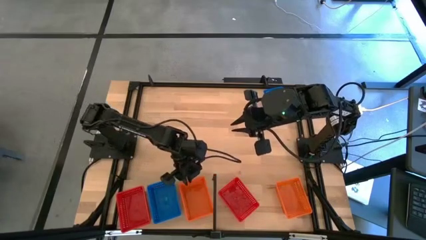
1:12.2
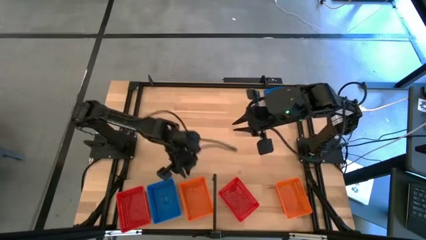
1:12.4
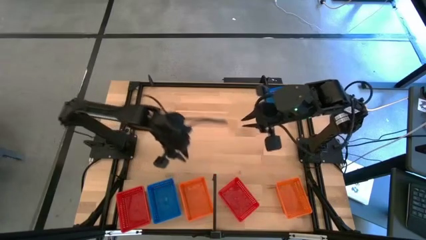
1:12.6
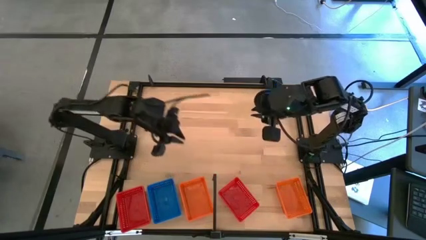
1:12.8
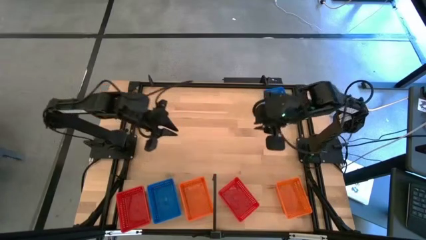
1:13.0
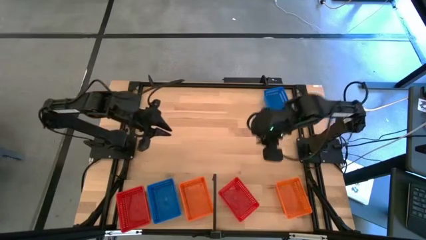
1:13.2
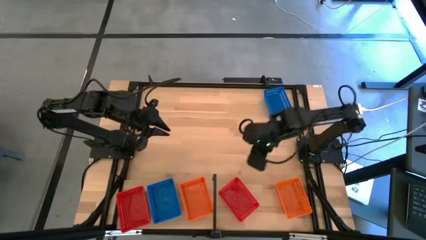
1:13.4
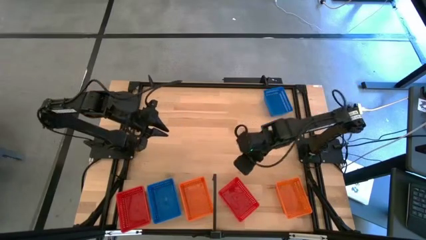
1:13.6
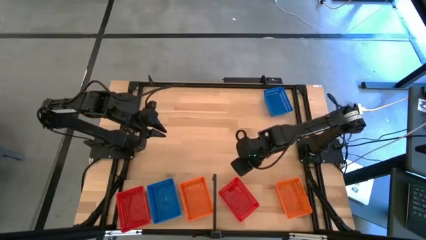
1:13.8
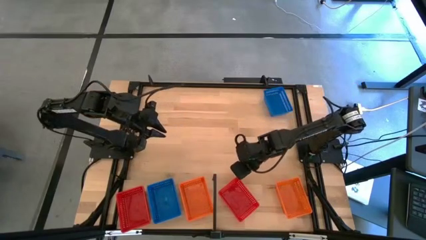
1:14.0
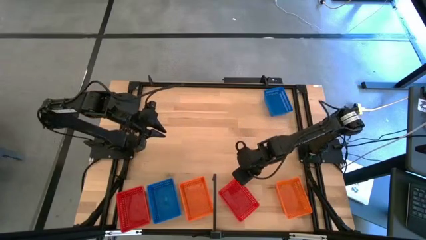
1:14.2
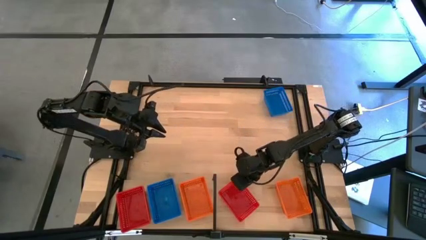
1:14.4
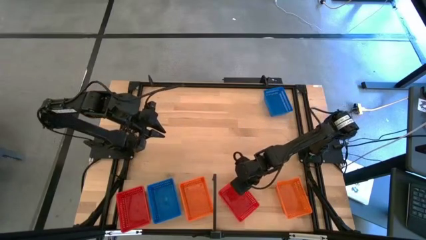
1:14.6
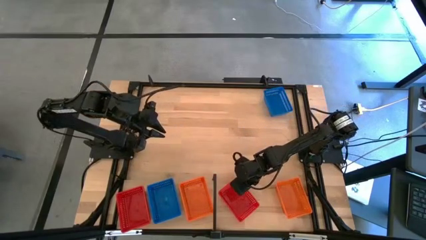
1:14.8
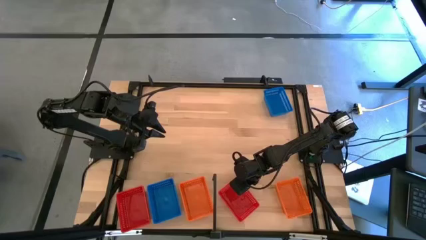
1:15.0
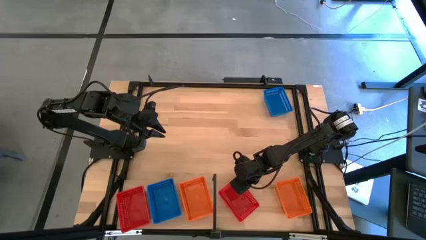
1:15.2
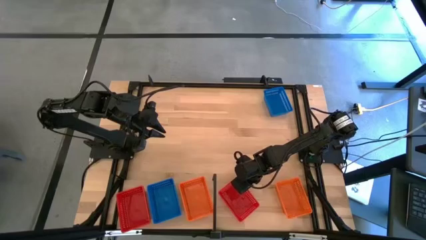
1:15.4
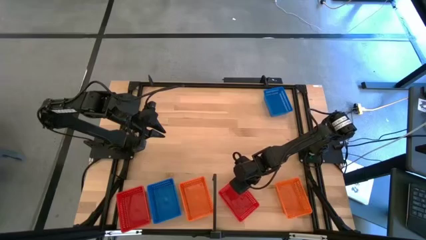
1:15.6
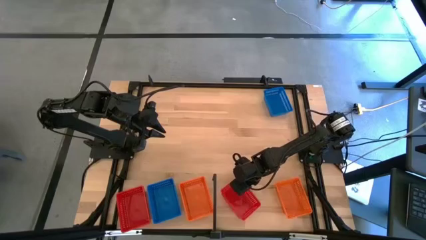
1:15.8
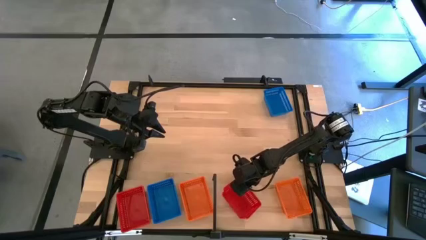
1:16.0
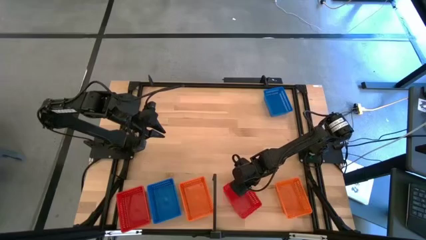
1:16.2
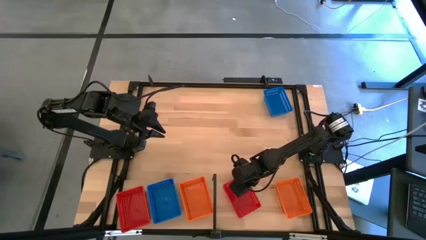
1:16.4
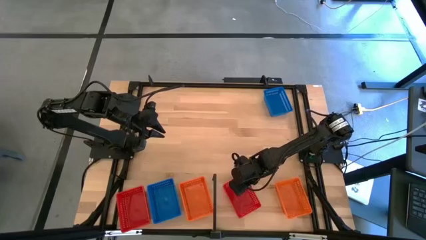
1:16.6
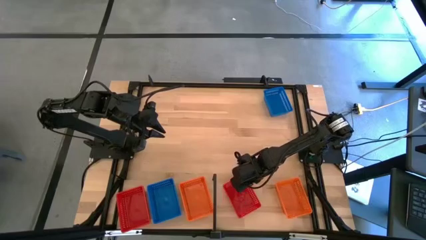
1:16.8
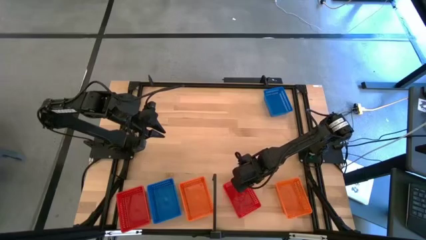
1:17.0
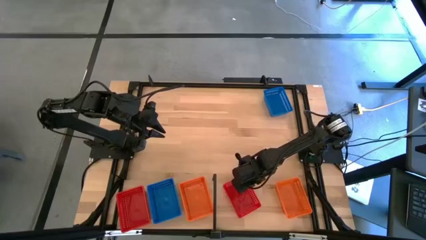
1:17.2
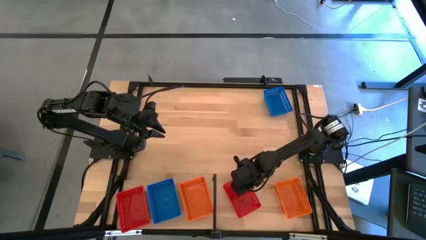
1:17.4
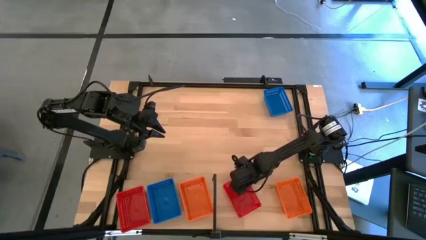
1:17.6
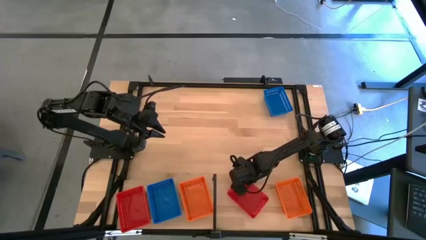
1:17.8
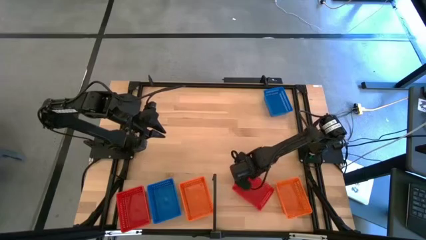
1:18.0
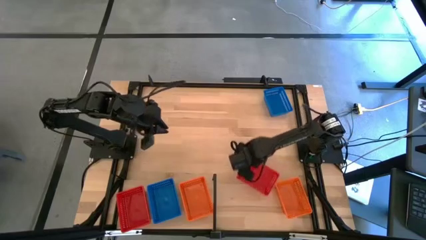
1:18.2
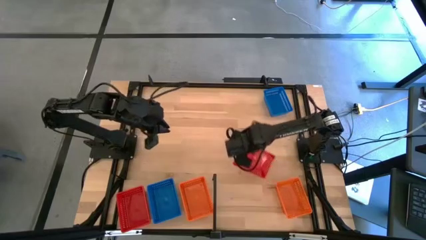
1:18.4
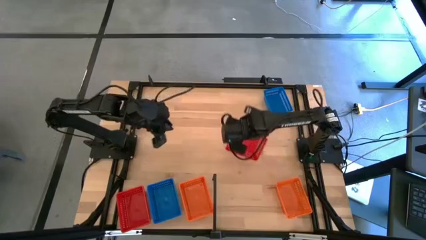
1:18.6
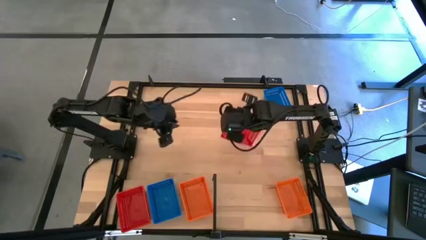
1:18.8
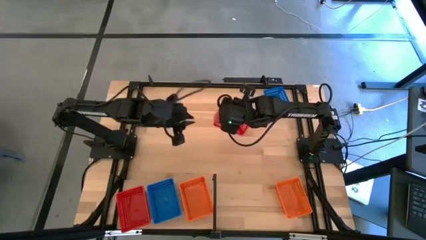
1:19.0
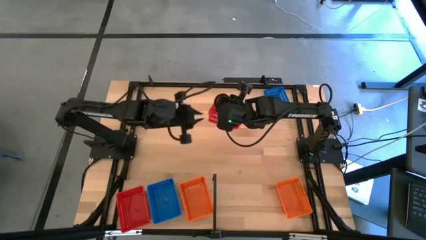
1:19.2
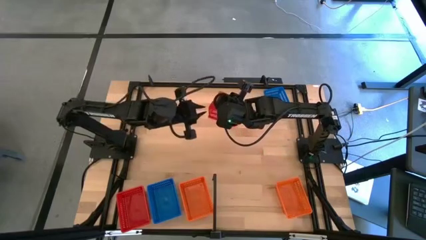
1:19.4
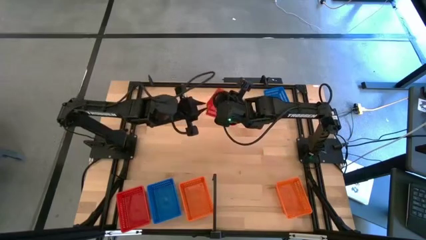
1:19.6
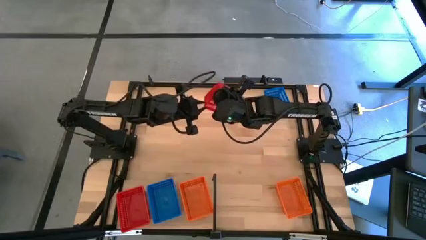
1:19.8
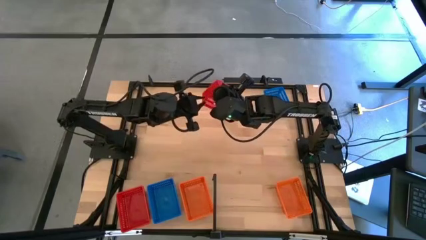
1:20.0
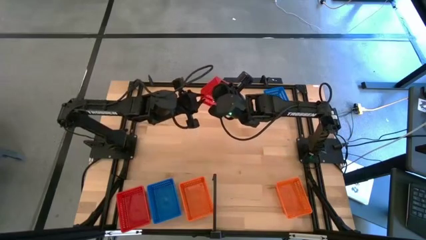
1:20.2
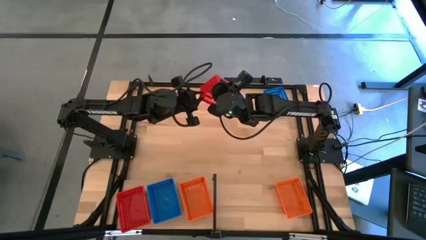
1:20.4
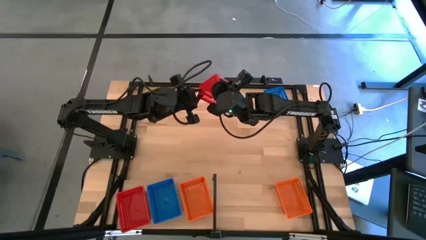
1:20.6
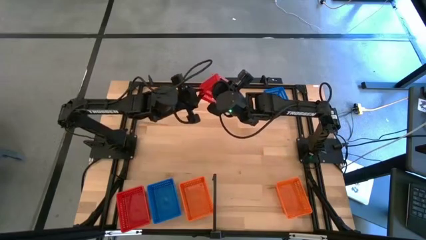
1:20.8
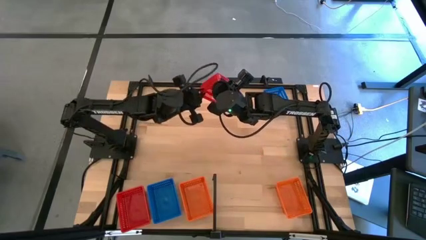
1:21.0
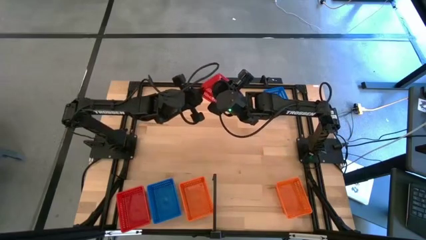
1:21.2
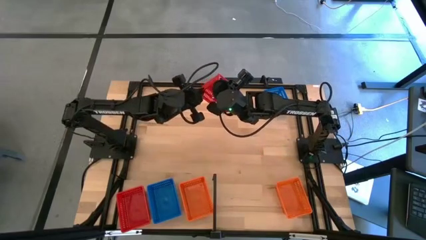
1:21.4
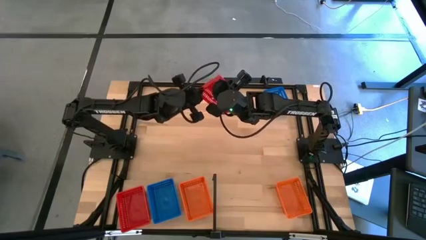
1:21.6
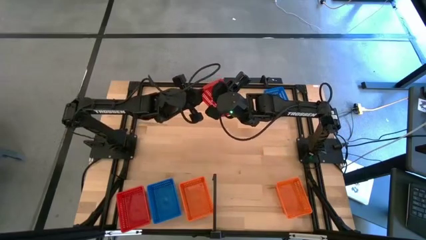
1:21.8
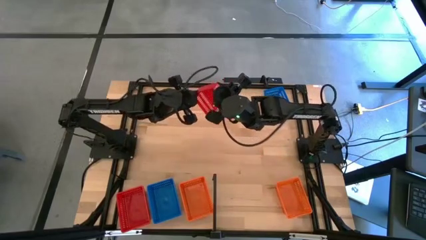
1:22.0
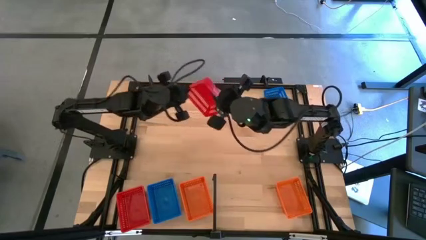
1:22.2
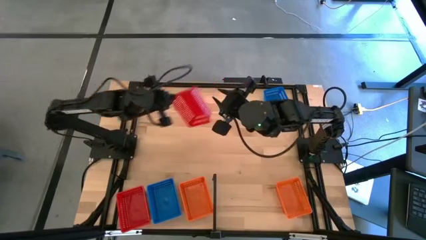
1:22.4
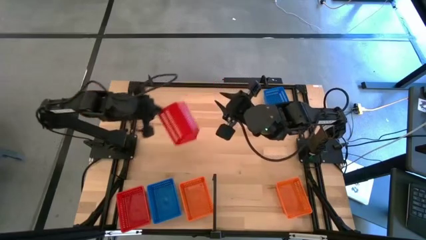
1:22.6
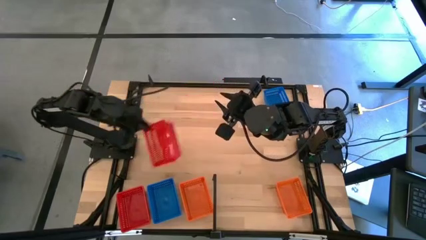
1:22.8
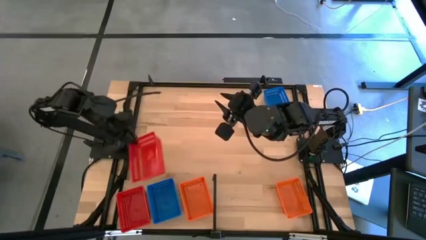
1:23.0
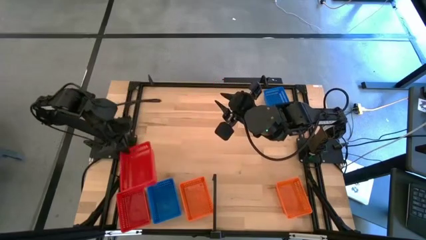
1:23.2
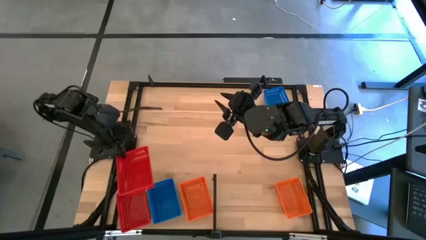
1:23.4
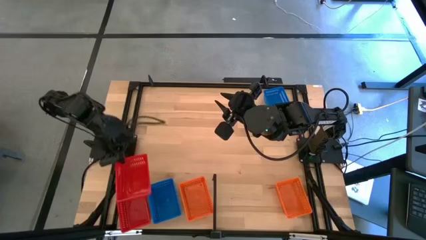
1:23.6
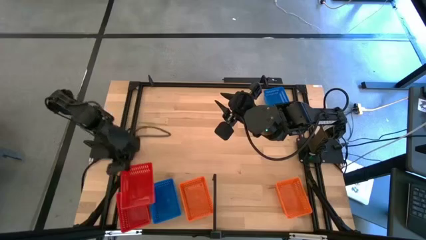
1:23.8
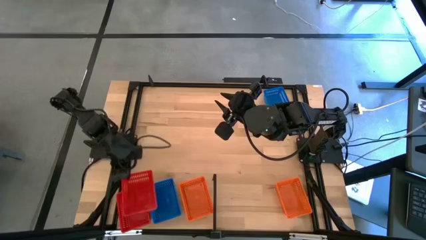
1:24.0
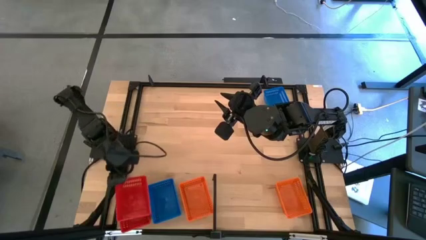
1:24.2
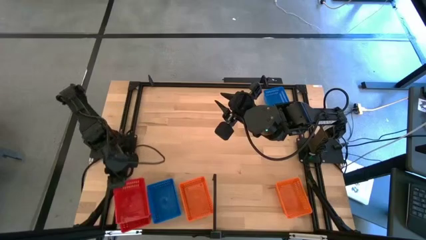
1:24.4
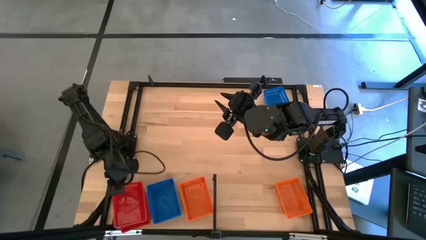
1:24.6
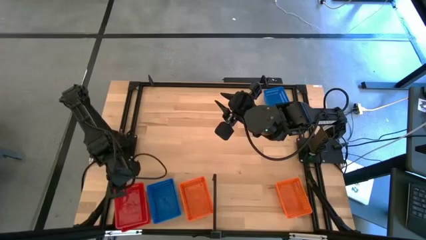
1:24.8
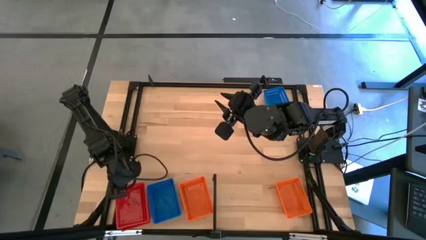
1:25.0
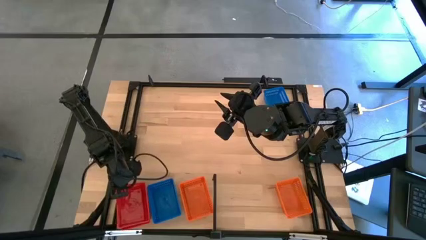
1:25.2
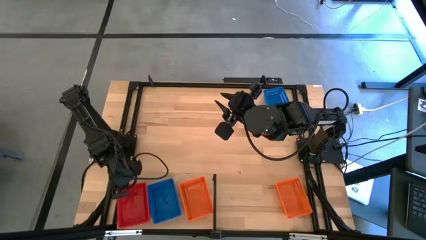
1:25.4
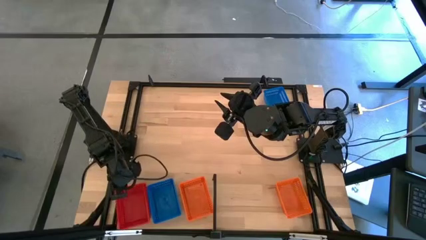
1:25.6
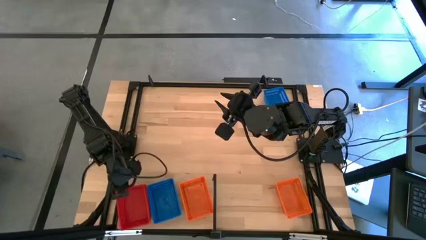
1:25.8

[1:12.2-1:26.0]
Task: Stack baskets on shelf by color
Stack the red bin on top of the red bin on the shelf
